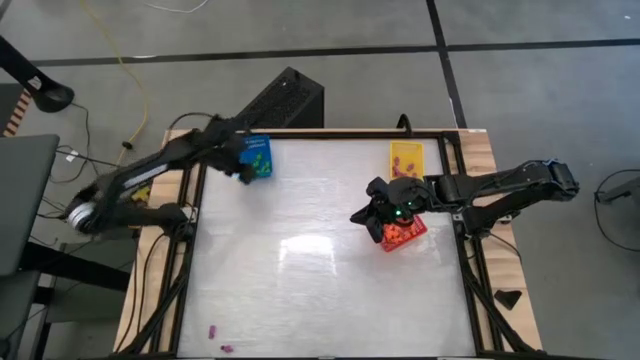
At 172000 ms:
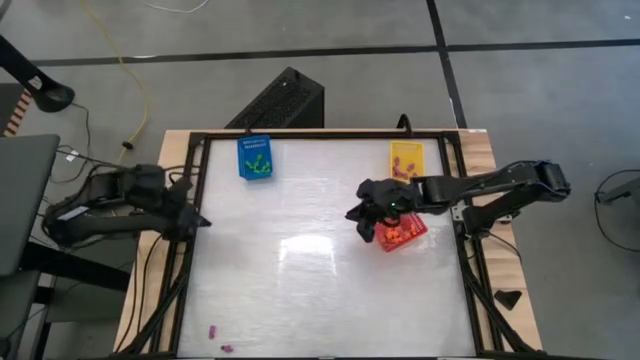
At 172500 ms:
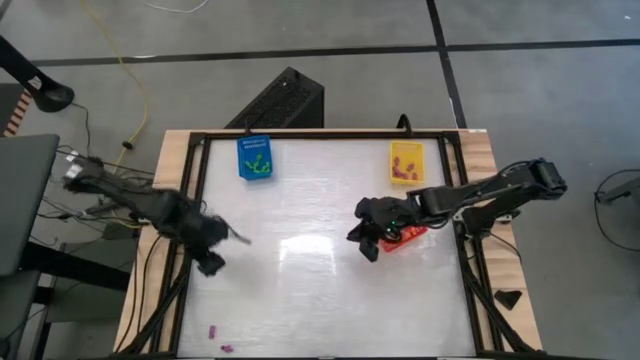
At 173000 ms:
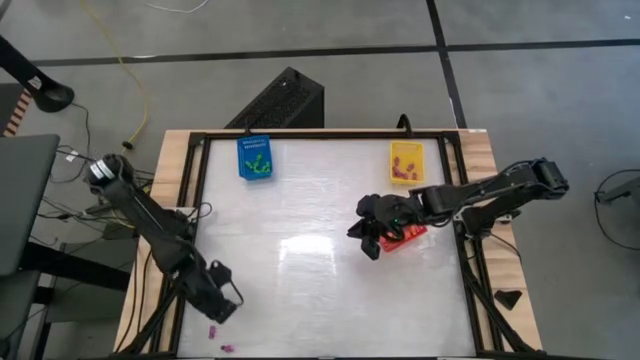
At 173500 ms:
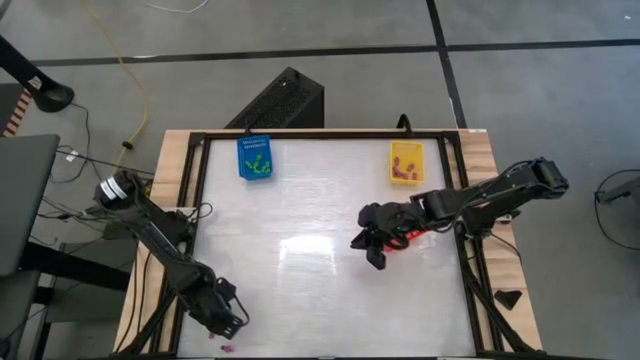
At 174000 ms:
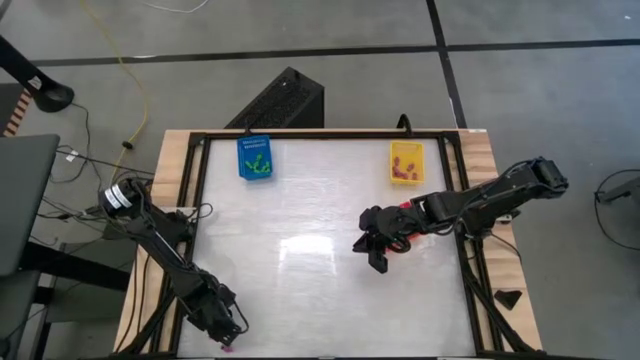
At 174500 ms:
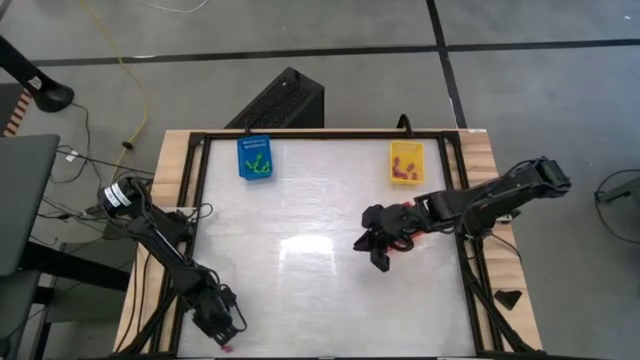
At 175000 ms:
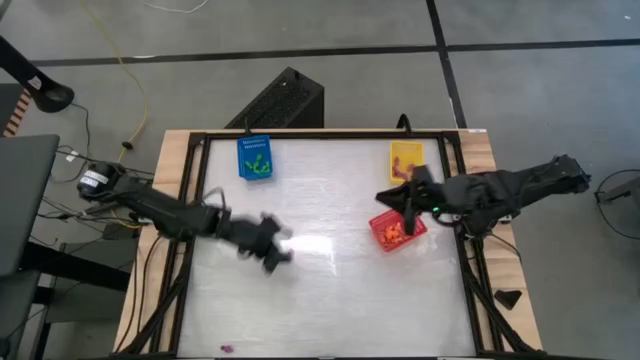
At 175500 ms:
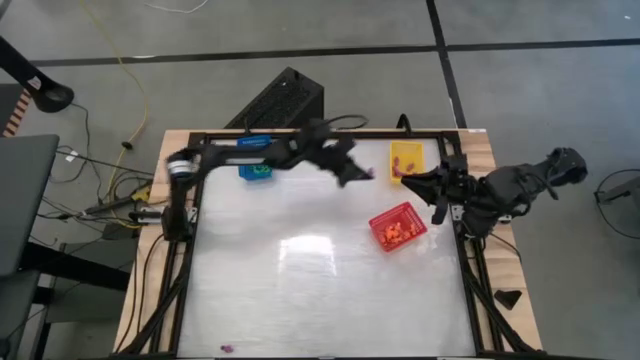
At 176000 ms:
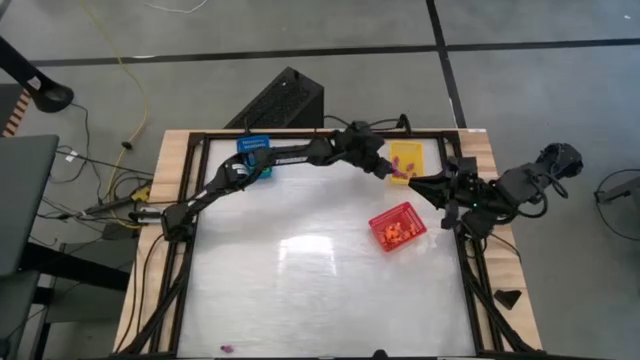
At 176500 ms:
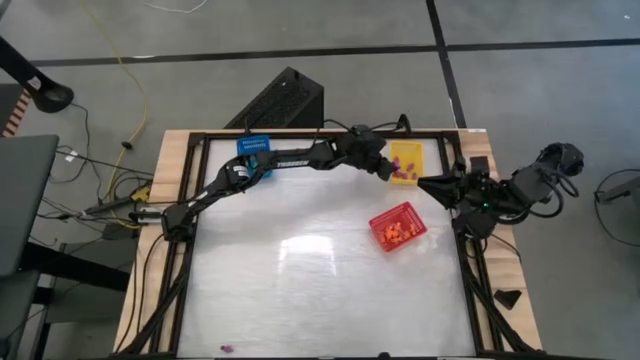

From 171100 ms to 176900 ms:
Task: Sort Halloween decoration
Put the purple skeleton toy into the yellow bin

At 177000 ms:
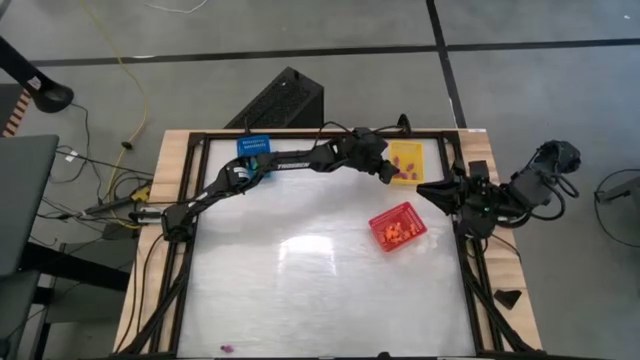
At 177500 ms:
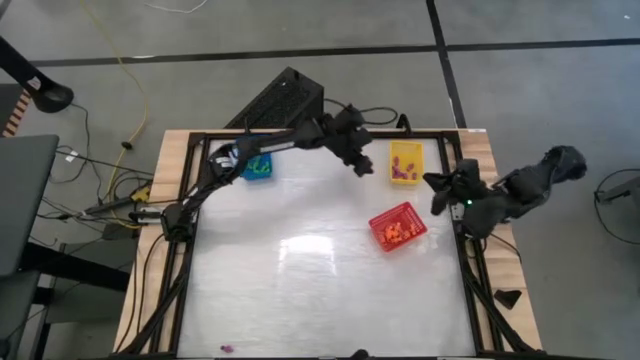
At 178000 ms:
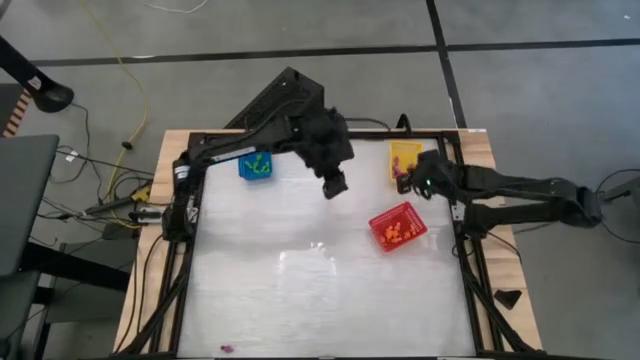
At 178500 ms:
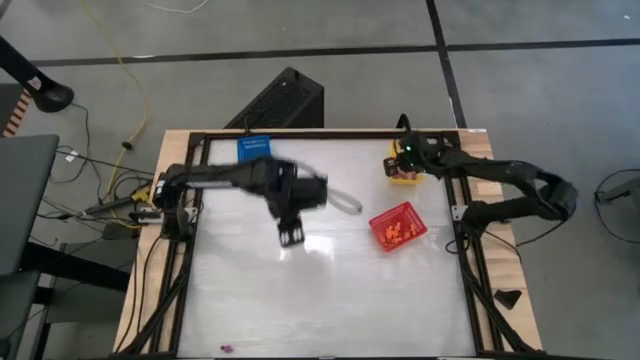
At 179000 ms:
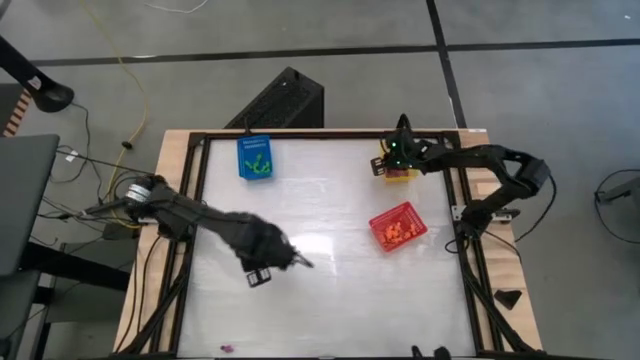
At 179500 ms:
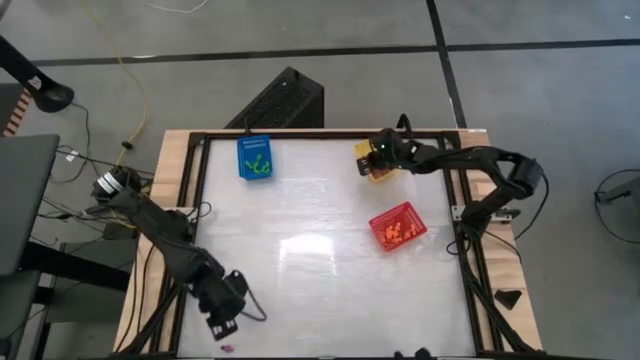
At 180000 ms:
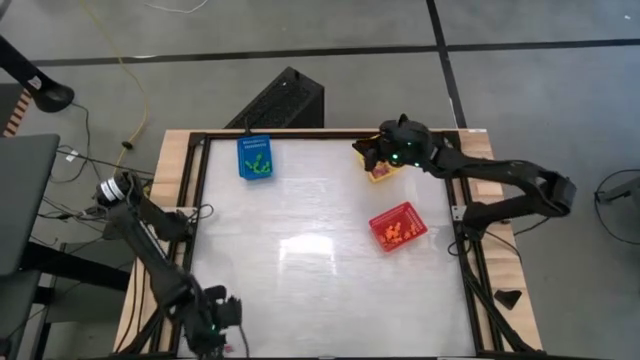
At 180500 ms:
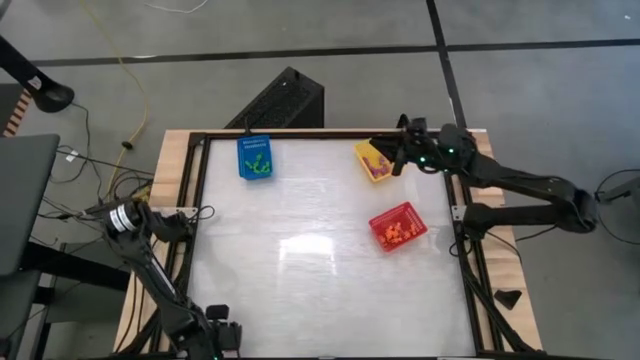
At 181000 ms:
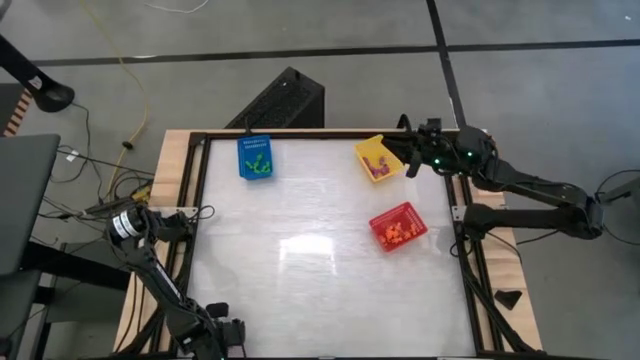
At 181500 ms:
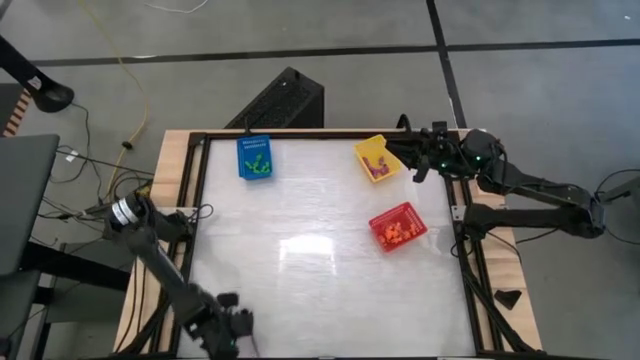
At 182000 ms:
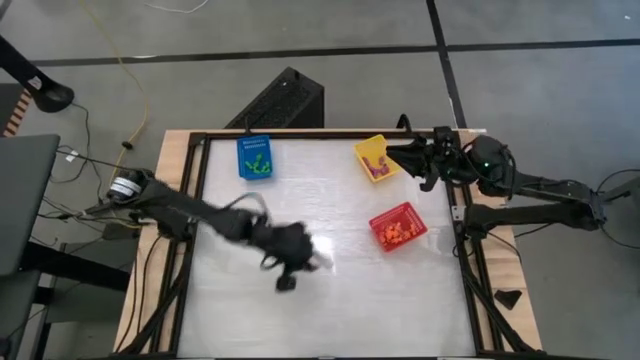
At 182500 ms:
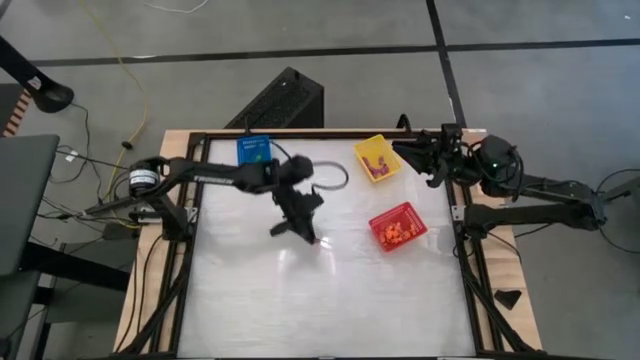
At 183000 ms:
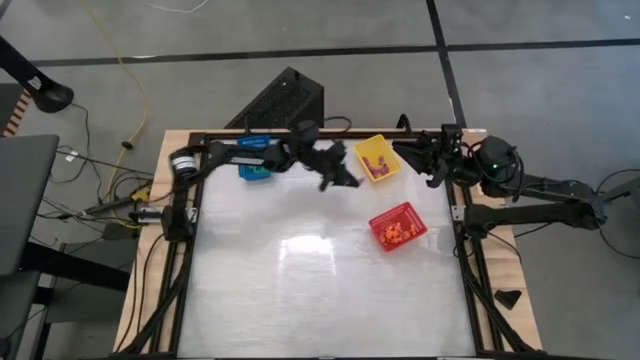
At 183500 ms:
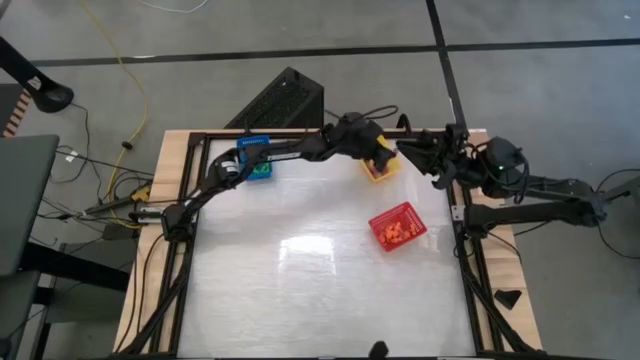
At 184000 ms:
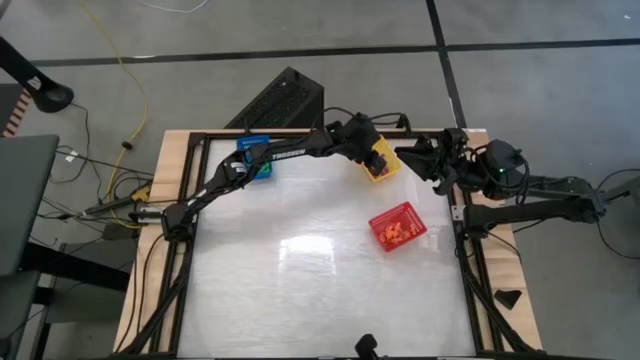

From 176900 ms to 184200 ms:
Put the purple skeleton toy into the yellow bin

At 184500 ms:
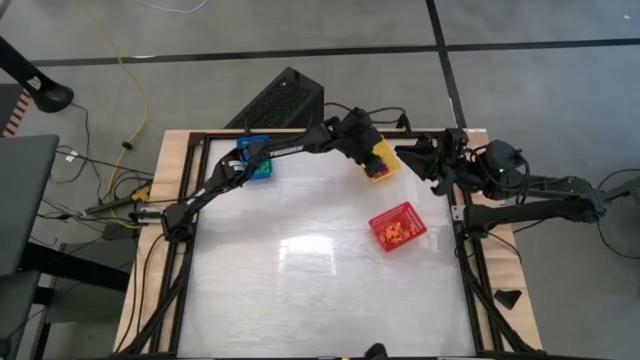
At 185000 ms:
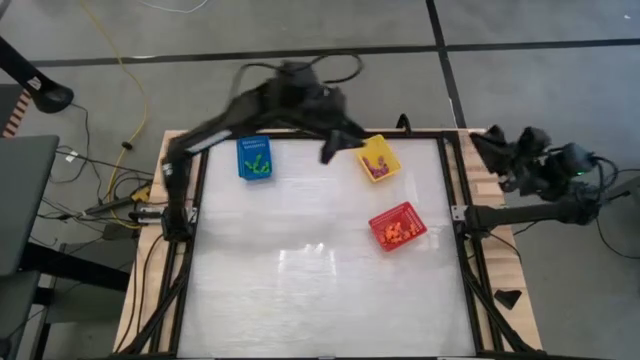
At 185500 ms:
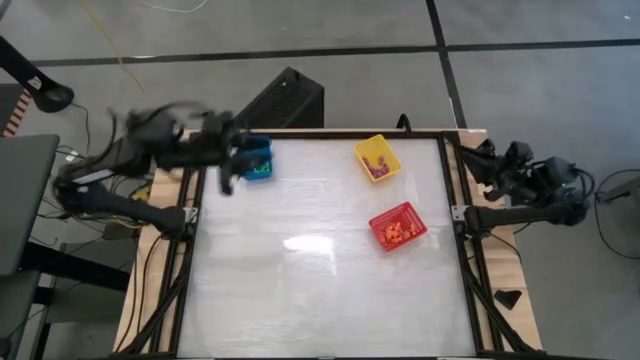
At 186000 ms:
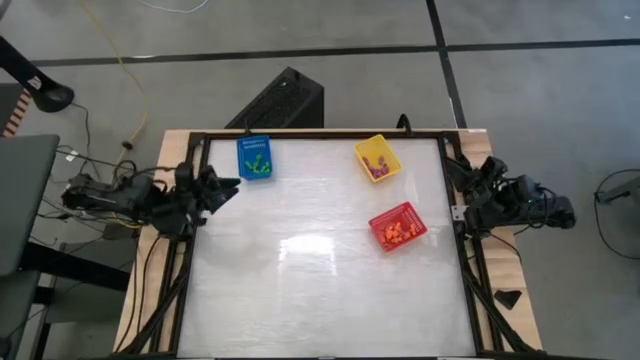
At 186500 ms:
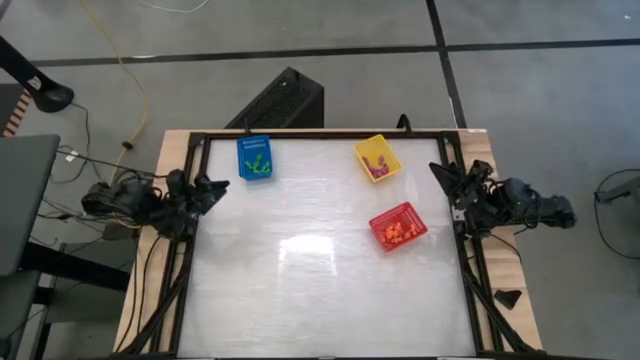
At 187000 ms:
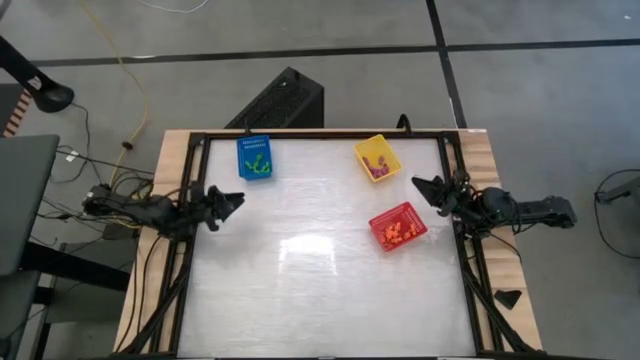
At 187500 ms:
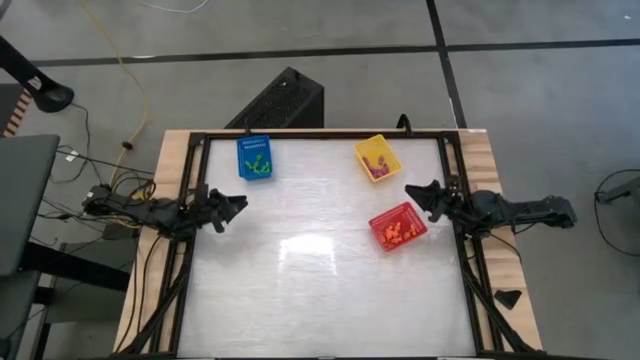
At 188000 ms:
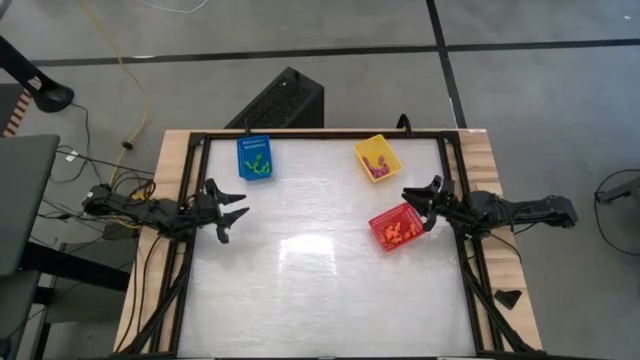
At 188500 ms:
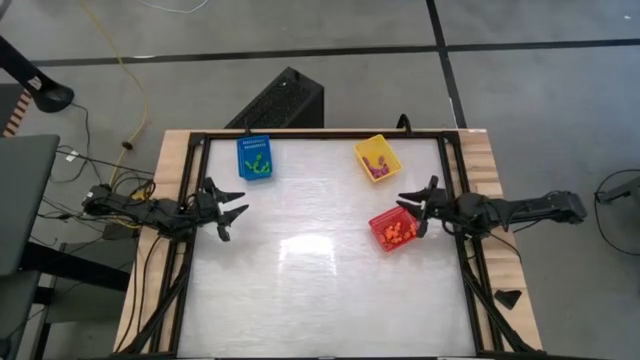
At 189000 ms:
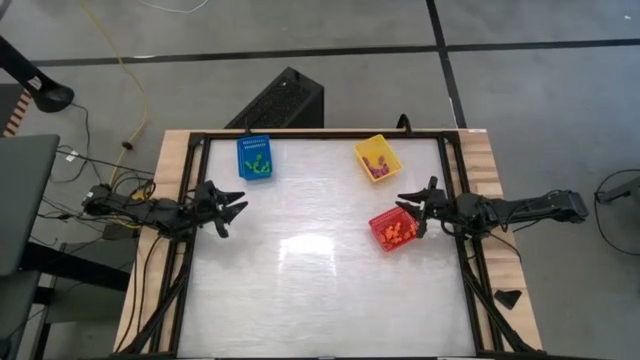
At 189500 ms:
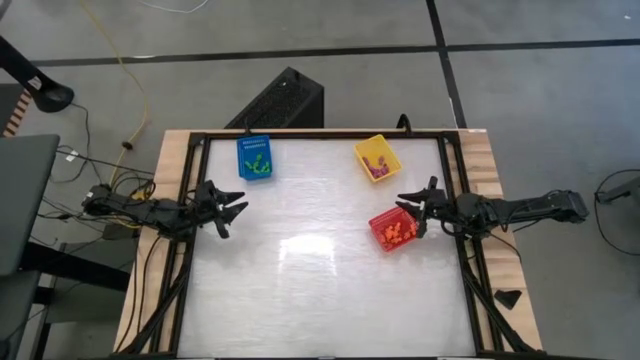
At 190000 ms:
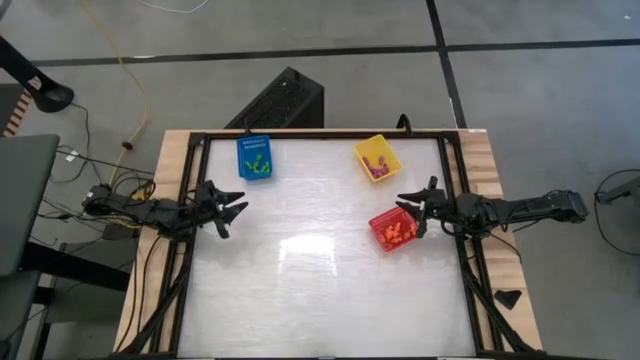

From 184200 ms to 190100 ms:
Return to Home Position

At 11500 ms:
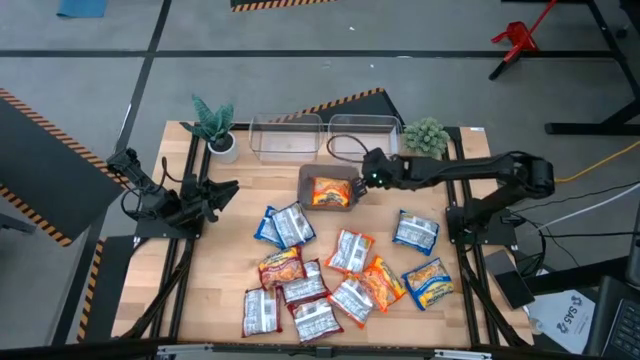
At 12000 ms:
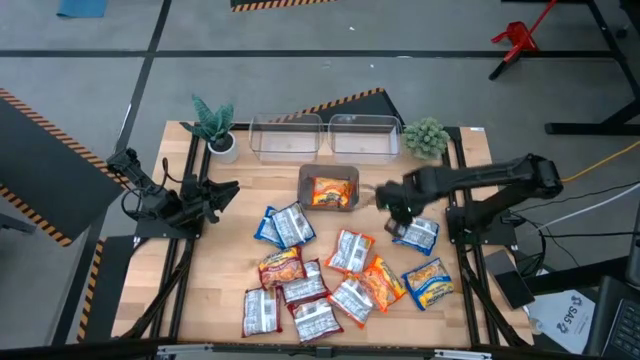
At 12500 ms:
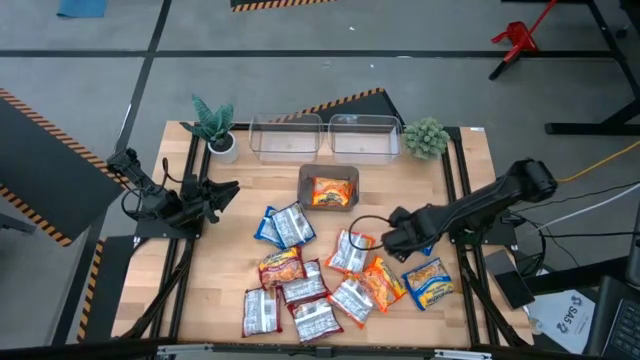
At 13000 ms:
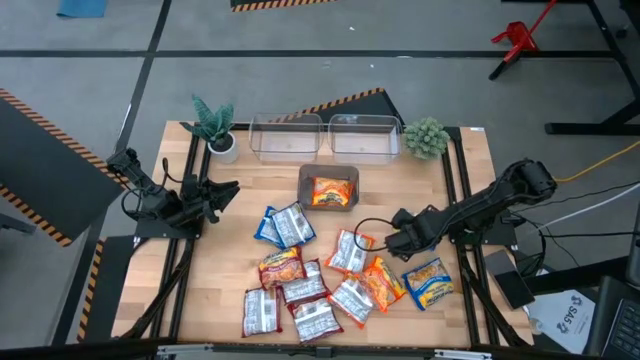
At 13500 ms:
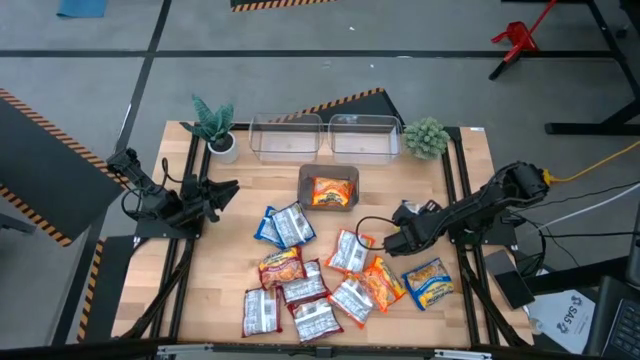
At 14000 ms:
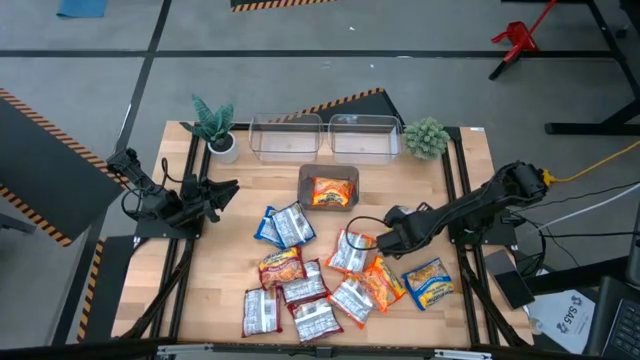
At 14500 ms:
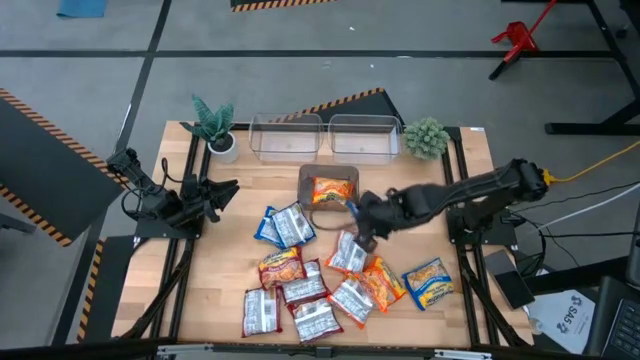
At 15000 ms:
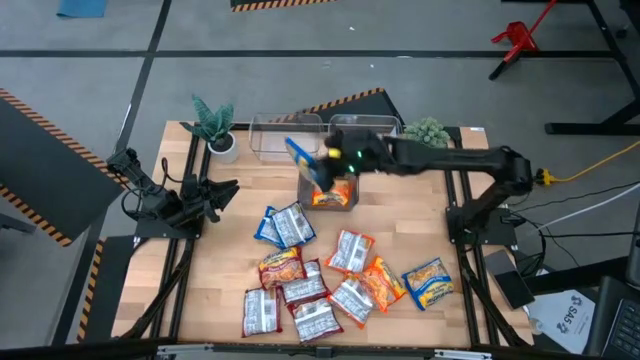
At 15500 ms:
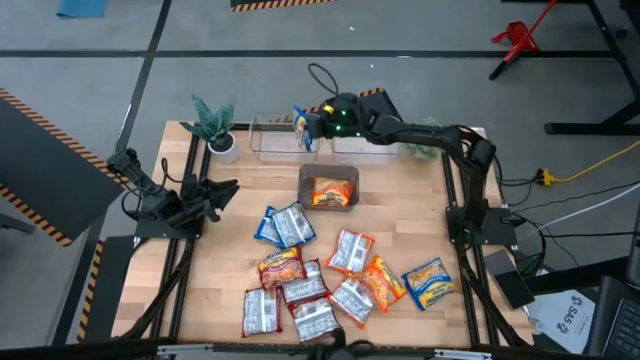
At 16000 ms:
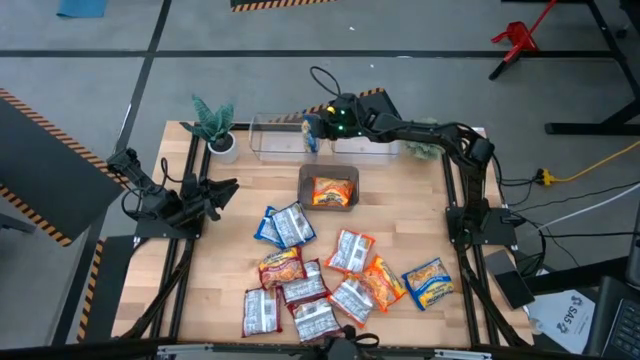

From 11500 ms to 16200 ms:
Task: Sort Maruchan noodles
Put the blue noodle pack into the left transparent bin
